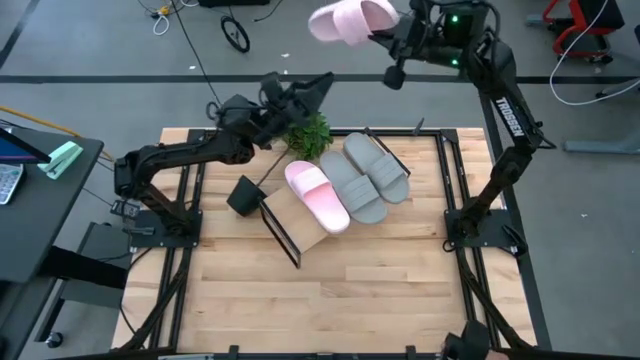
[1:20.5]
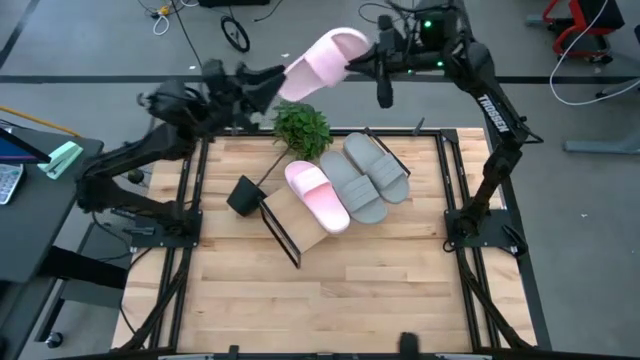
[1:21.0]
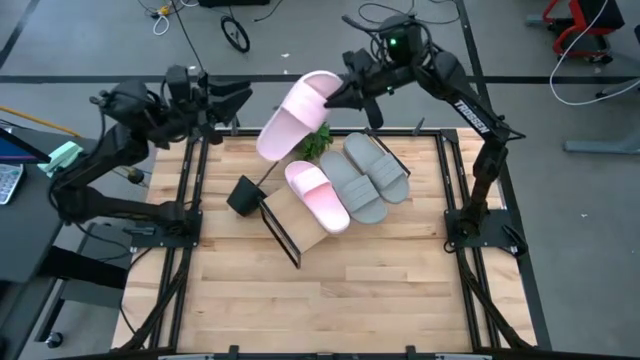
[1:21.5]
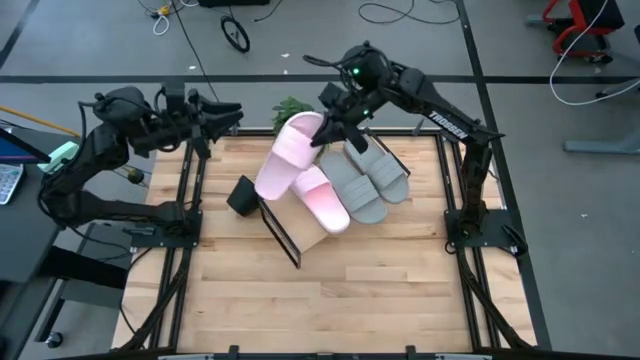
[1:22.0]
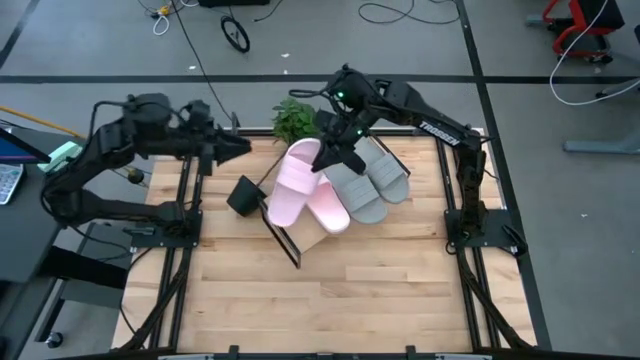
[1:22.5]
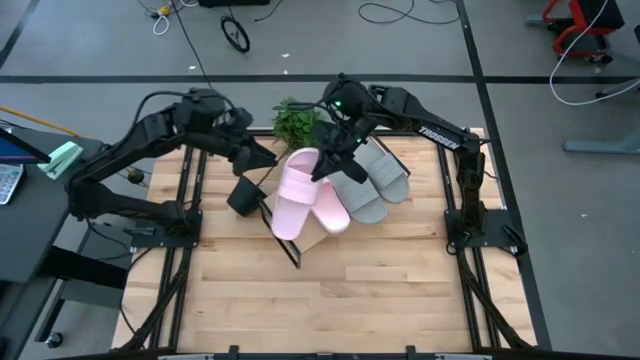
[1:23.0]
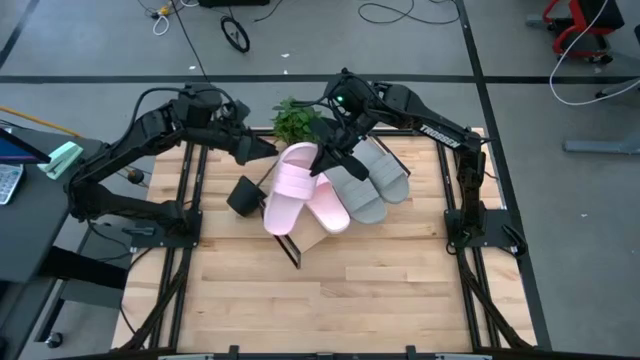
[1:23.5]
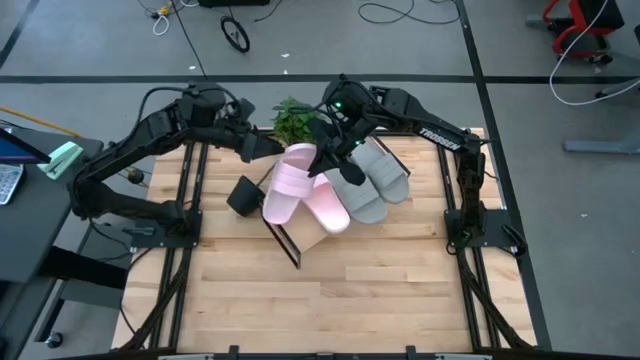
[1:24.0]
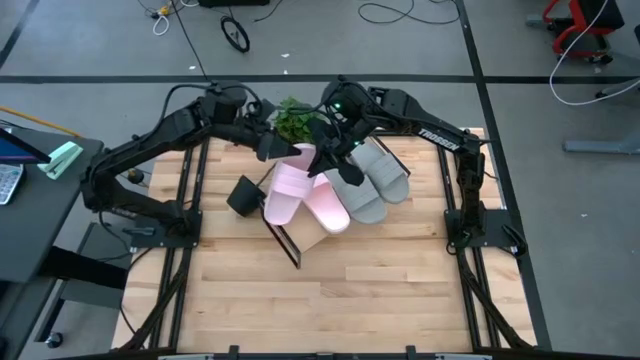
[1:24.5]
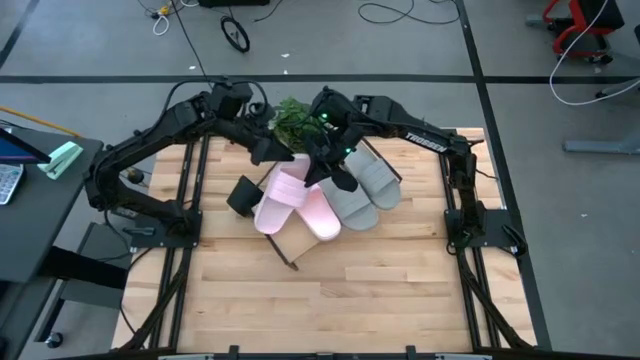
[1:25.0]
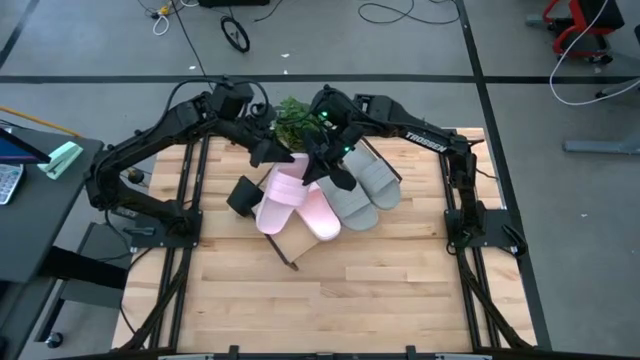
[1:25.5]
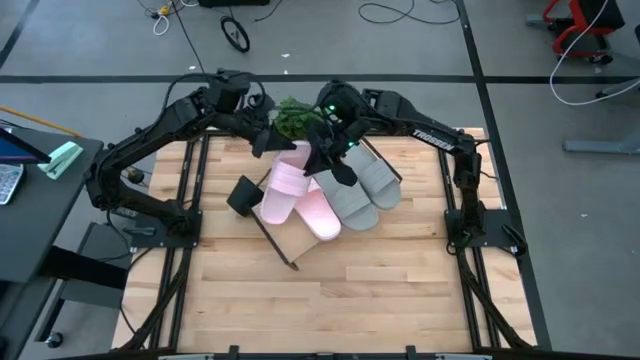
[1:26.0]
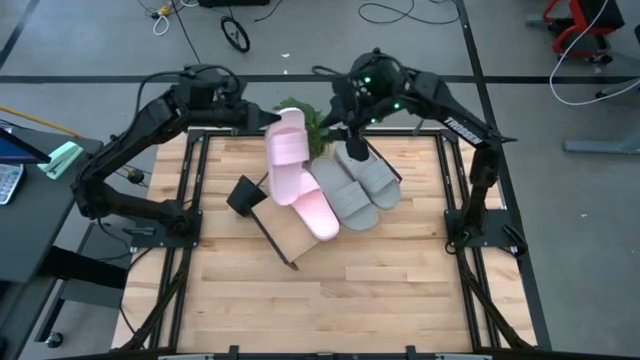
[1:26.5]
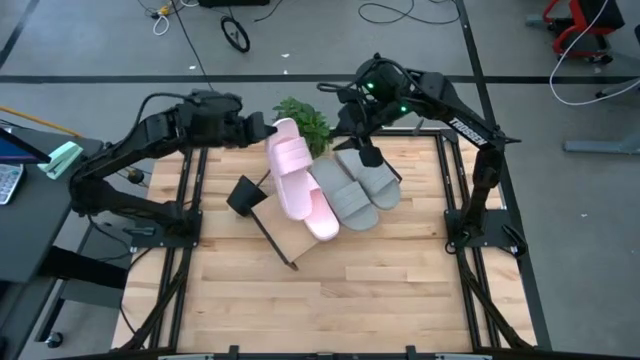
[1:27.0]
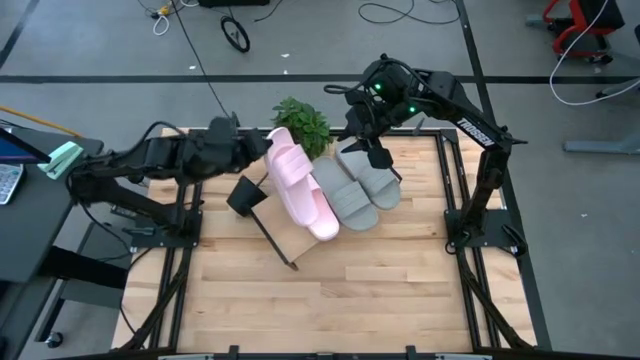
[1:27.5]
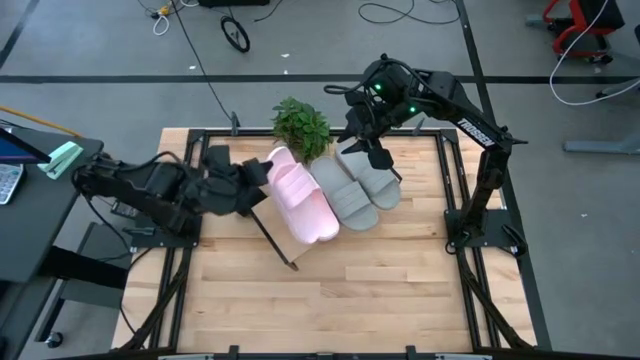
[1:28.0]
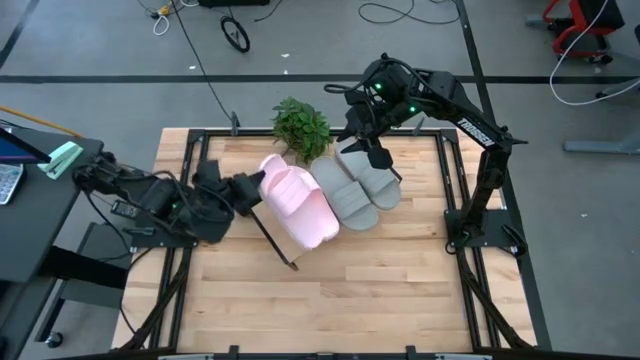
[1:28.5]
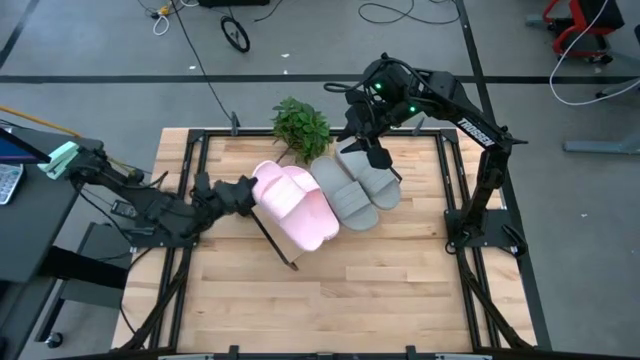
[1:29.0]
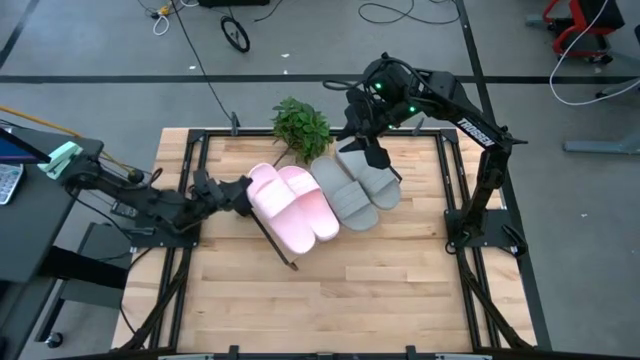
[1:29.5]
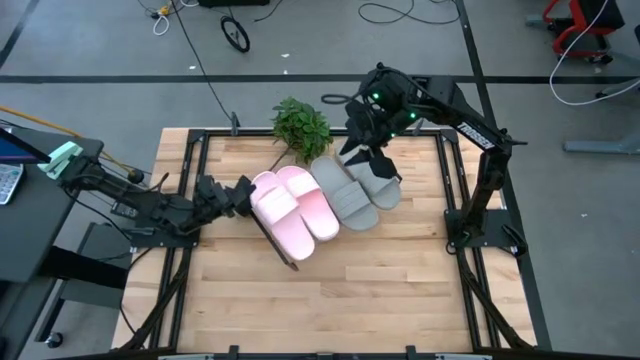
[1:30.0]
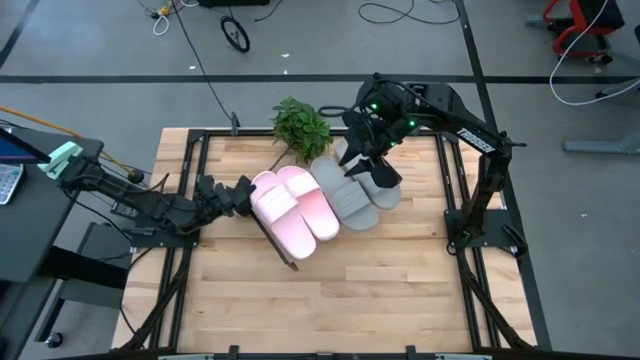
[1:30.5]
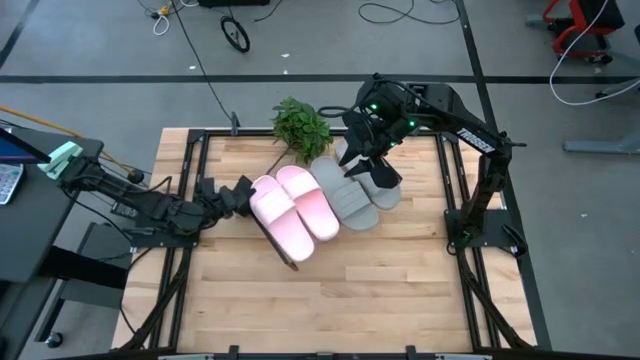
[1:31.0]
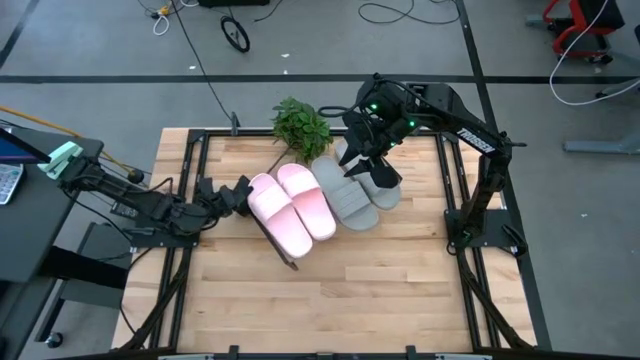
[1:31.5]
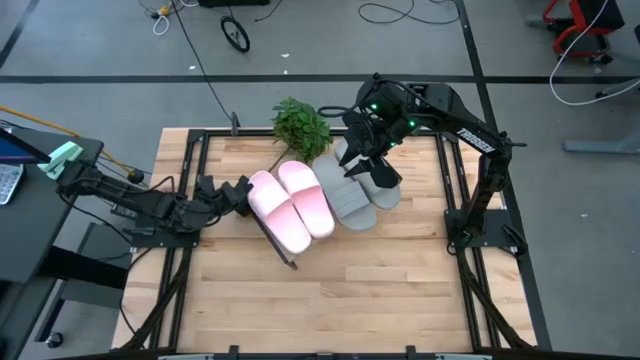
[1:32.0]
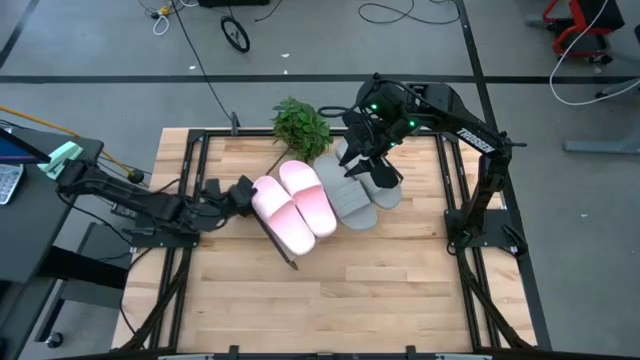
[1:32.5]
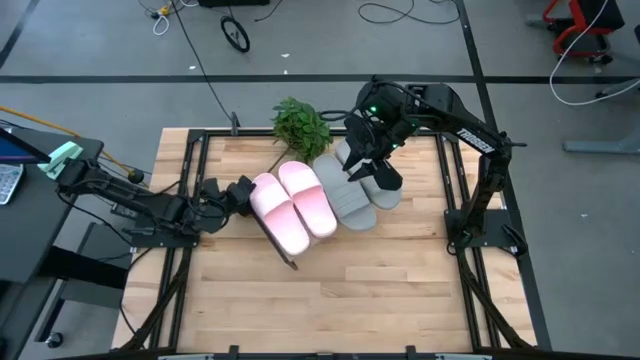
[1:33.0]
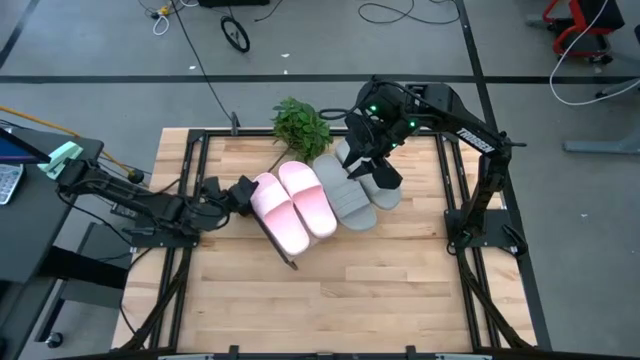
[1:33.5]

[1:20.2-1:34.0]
Task: Pick and place slides into the shelf
Put the pink slides on the shelf

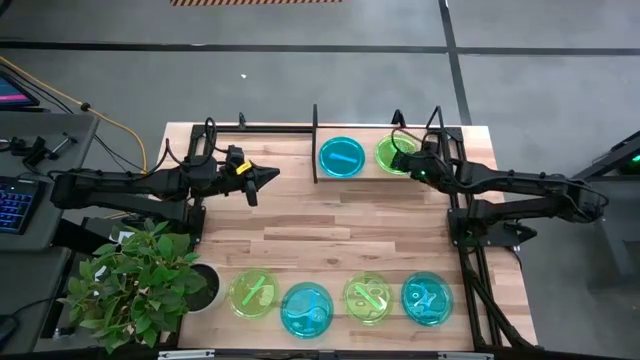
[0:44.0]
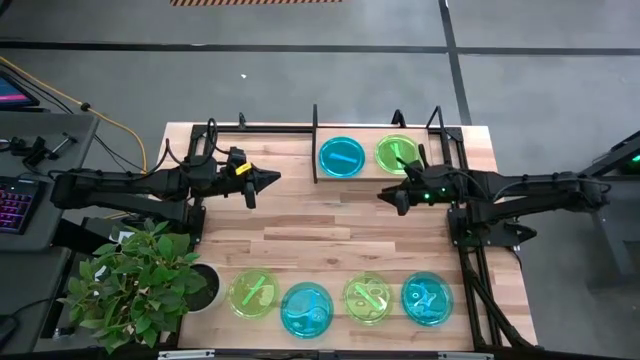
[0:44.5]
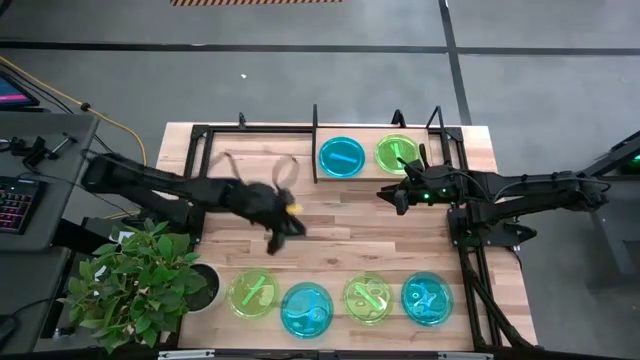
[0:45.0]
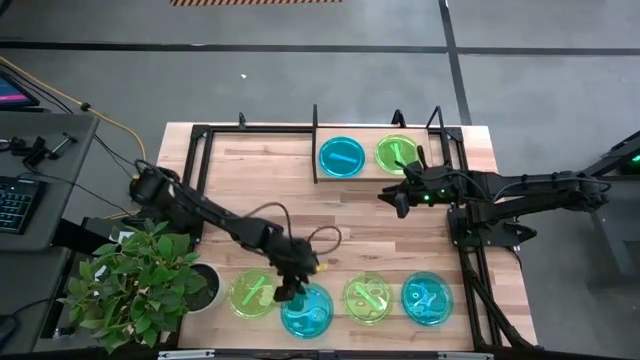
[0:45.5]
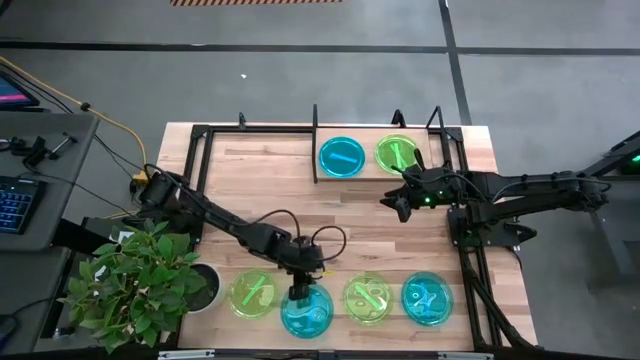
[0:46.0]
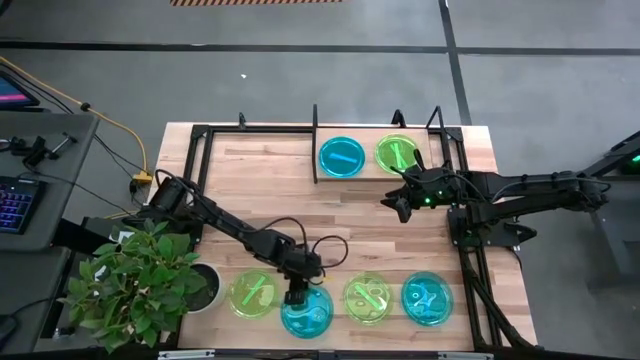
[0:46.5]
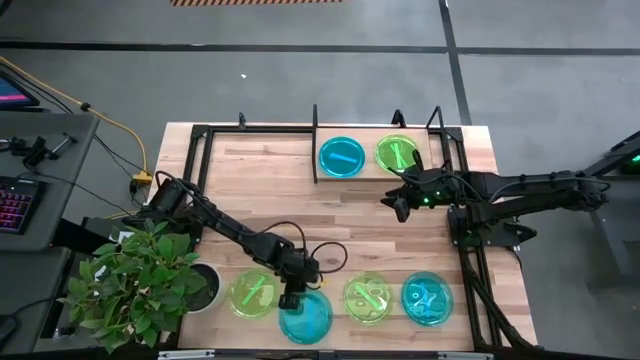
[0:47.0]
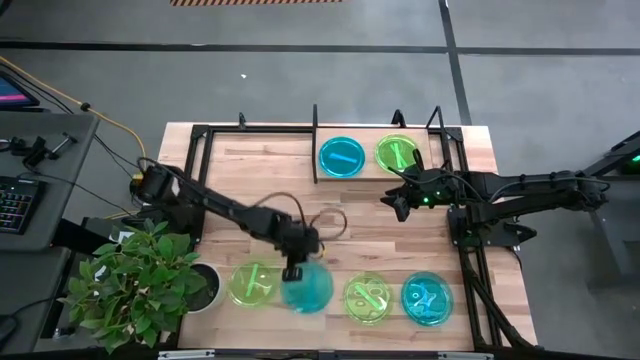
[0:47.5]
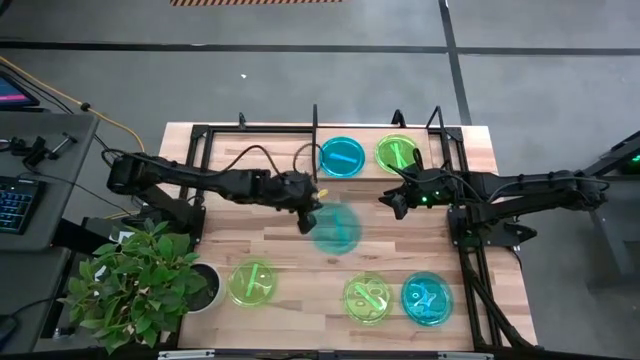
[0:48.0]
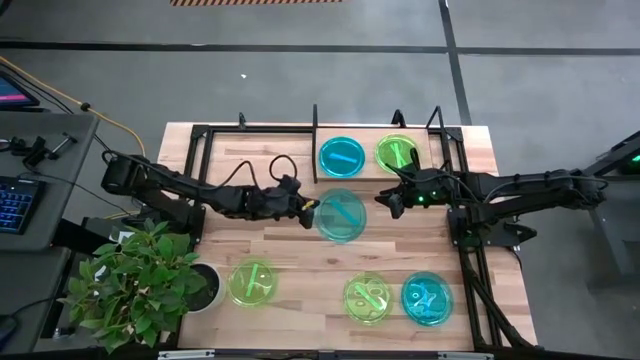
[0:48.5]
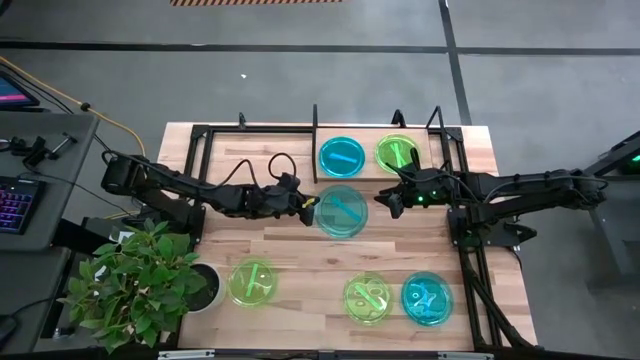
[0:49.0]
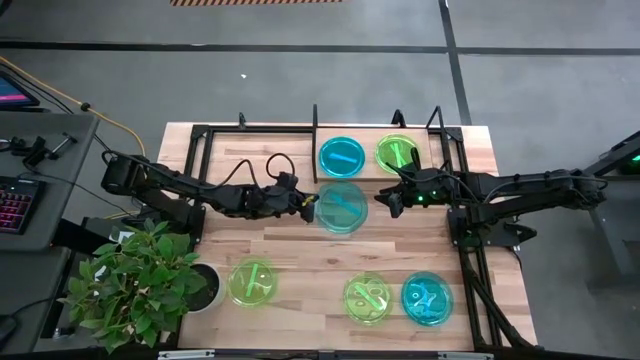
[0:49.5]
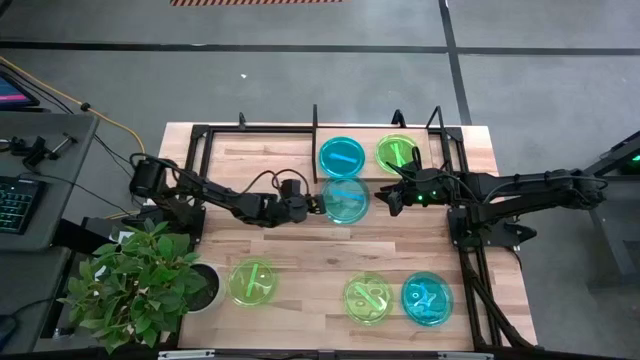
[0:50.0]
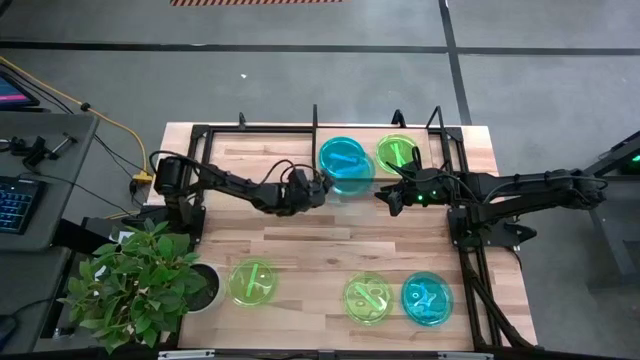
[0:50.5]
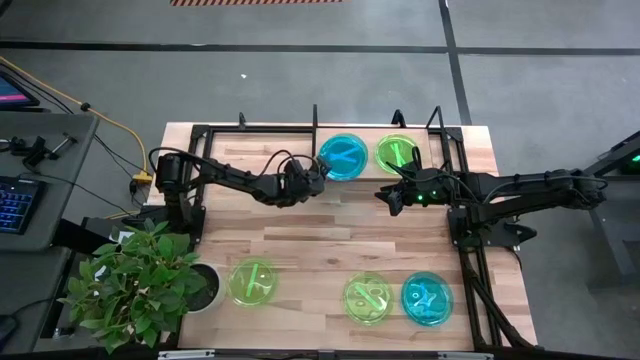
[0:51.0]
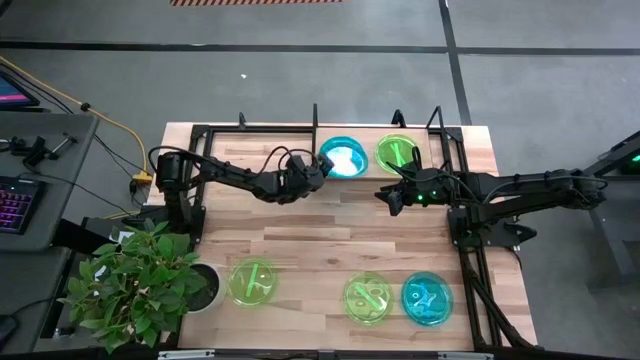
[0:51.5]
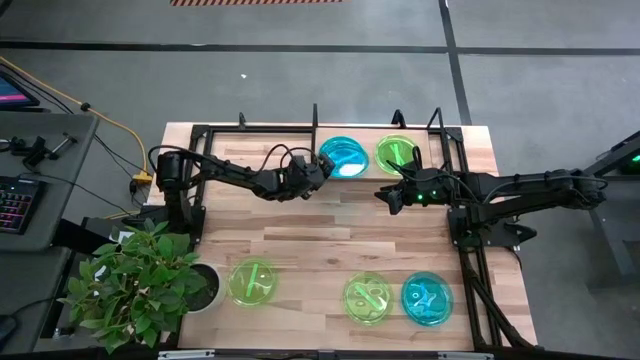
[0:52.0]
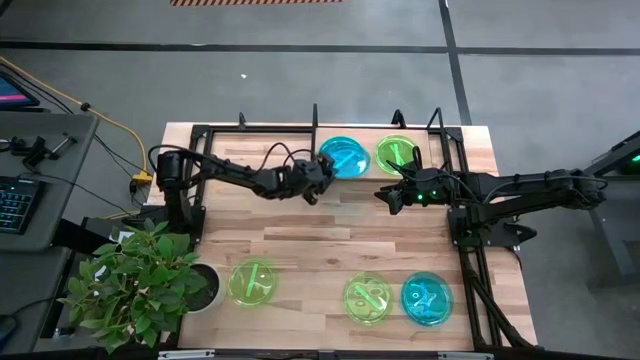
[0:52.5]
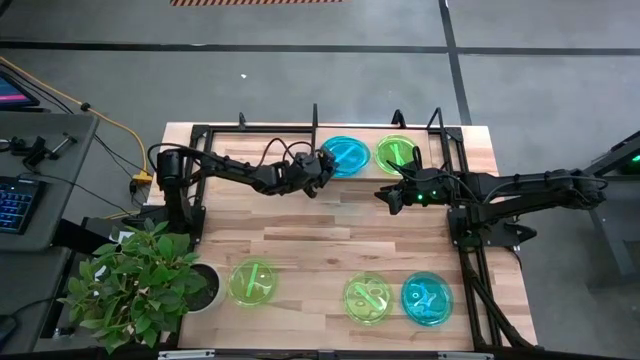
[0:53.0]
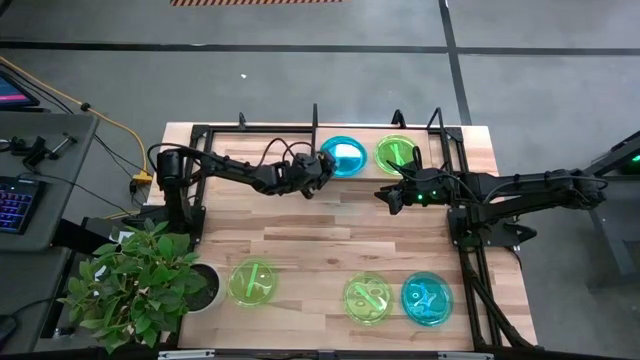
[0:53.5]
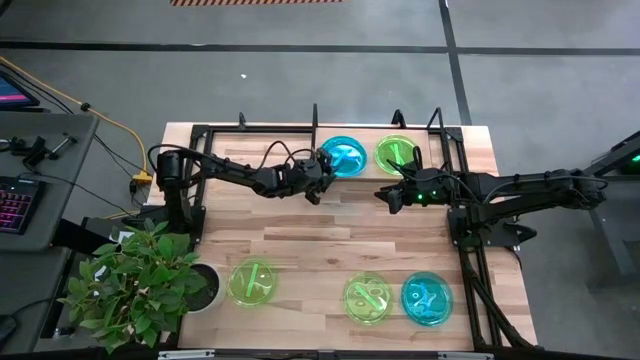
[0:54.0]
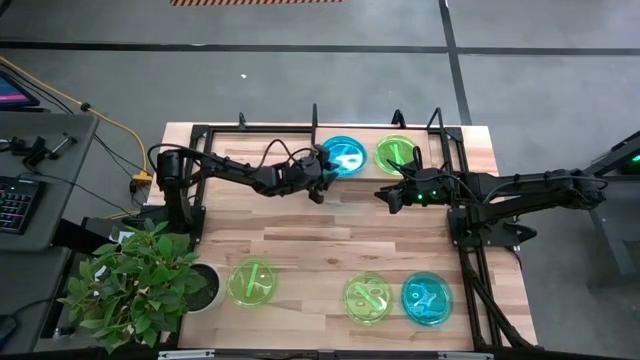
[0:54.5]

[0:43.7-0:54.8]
Task: Place and stack plates onto a shelf
Stack the left blue plate on top of the stacked blue plates on the shelf
